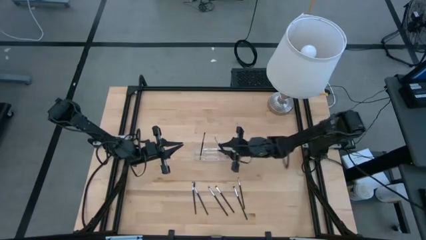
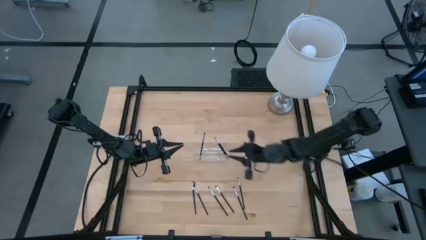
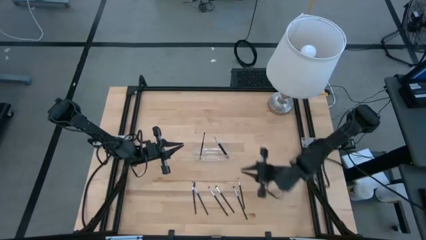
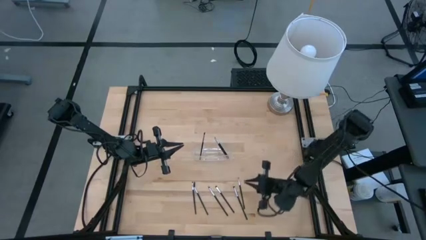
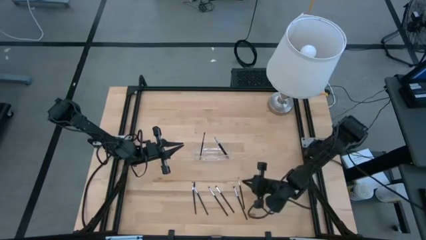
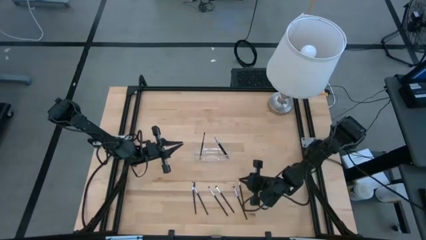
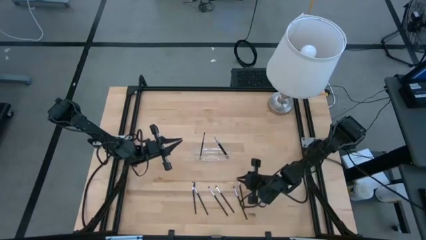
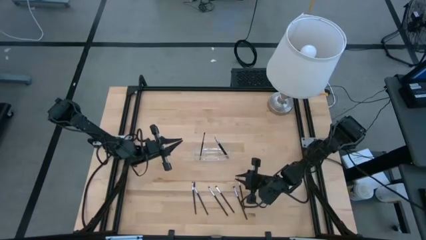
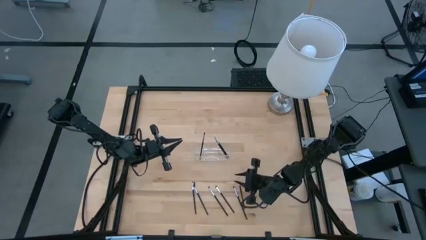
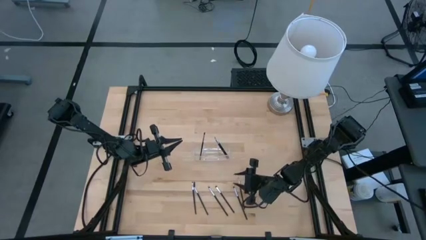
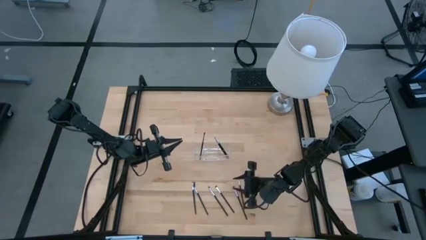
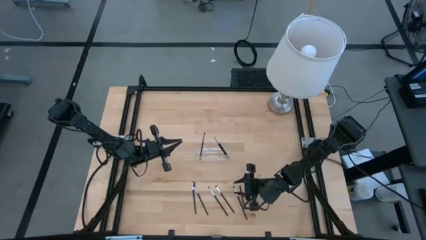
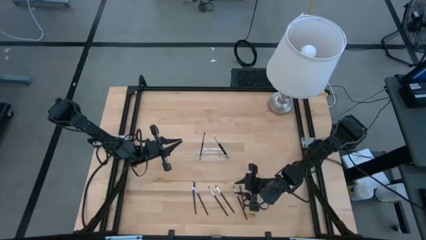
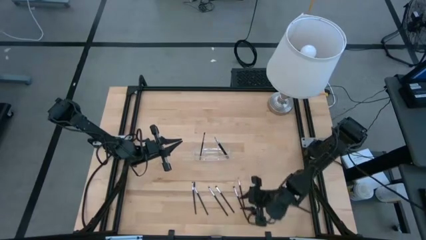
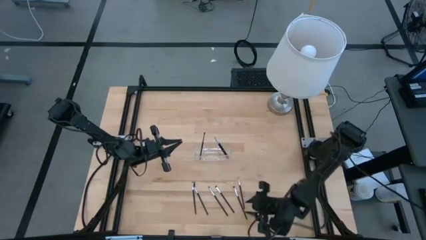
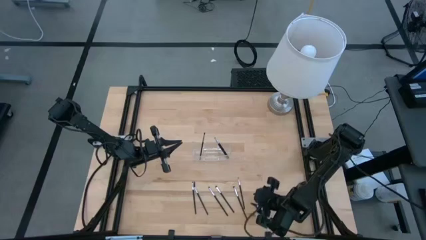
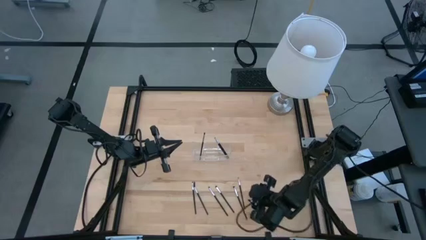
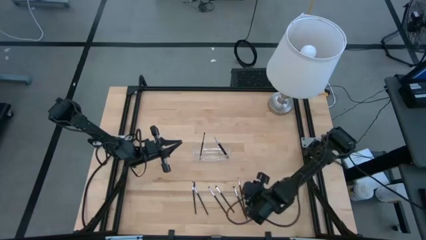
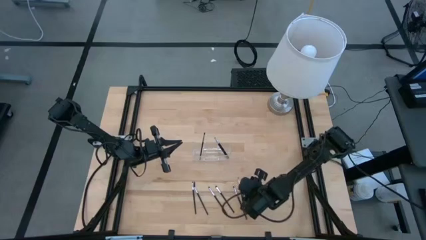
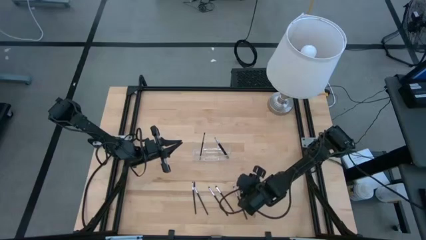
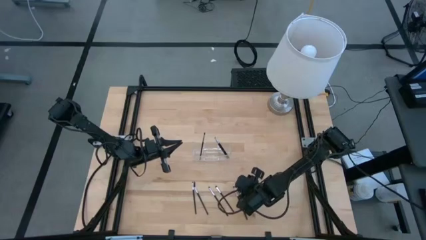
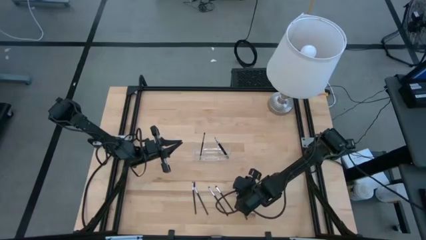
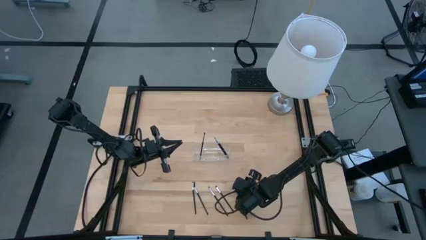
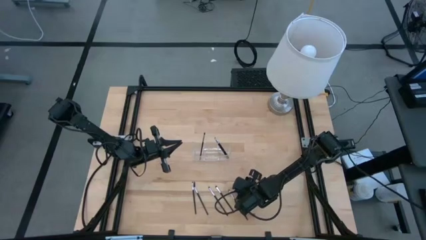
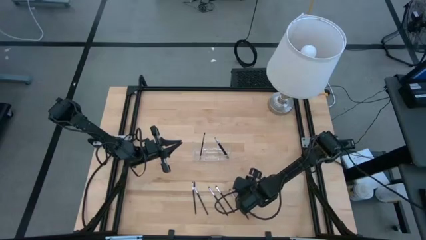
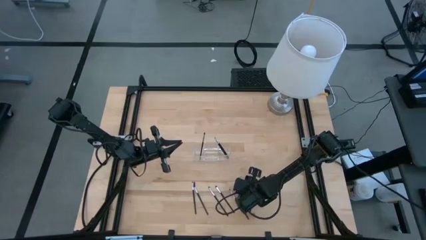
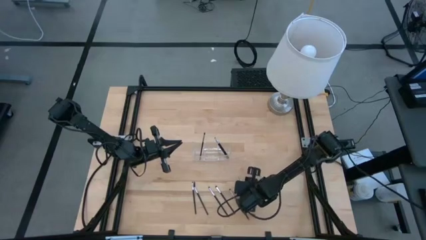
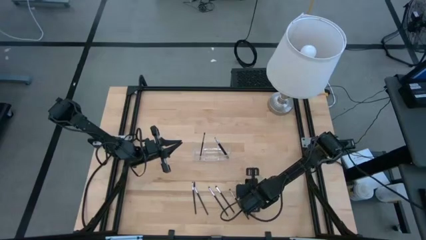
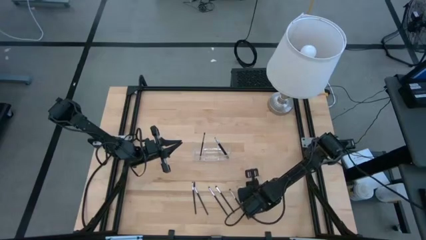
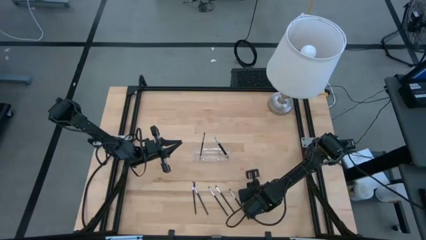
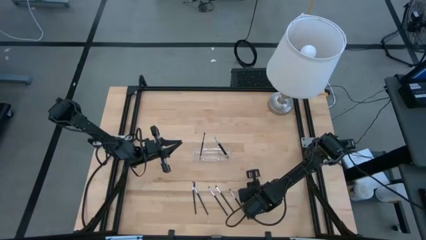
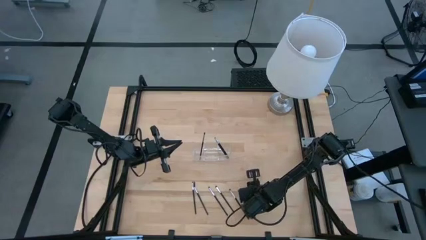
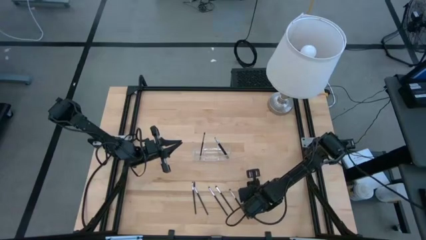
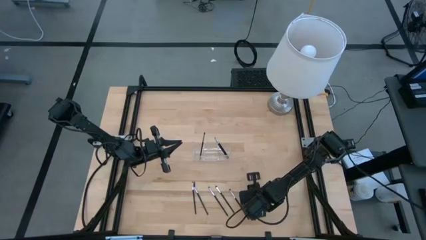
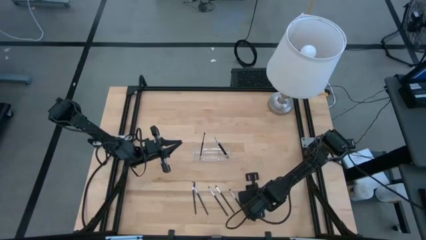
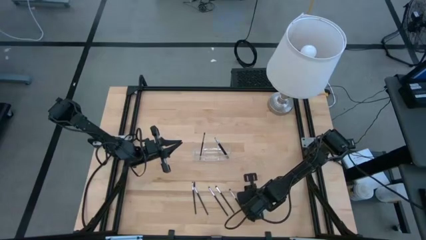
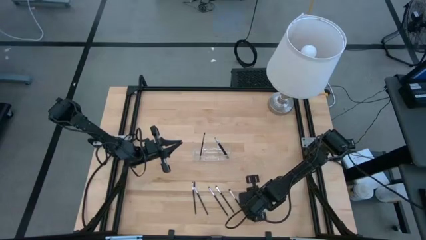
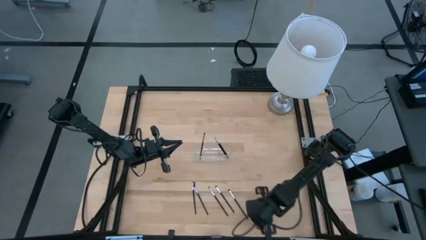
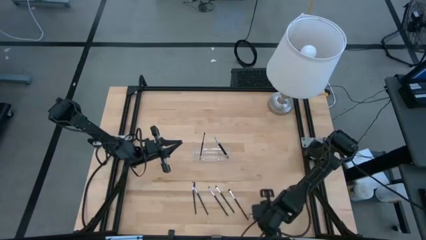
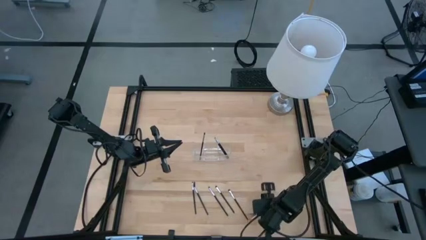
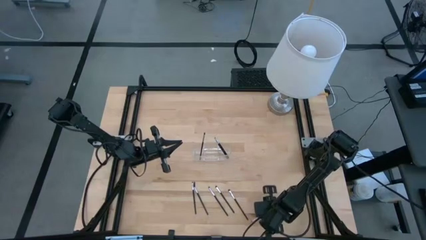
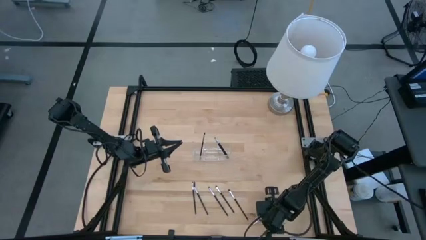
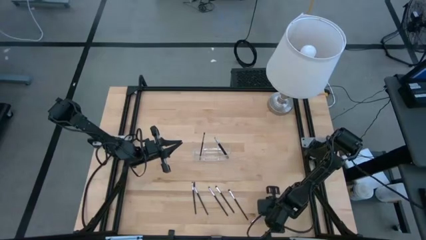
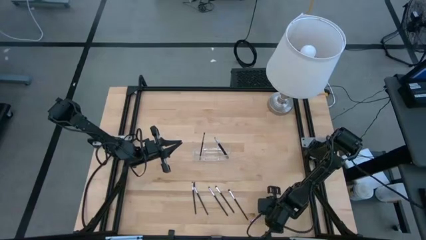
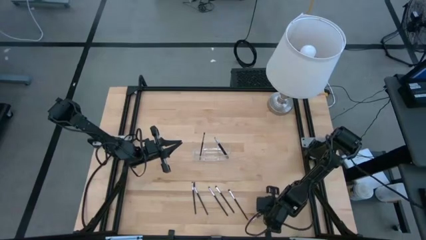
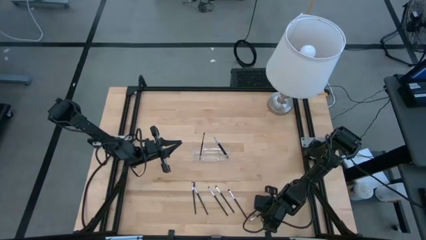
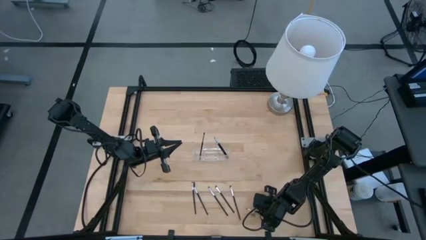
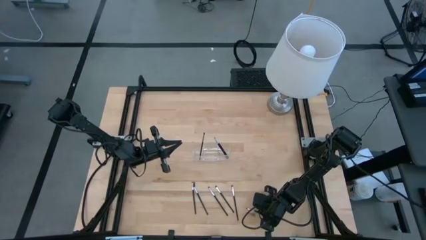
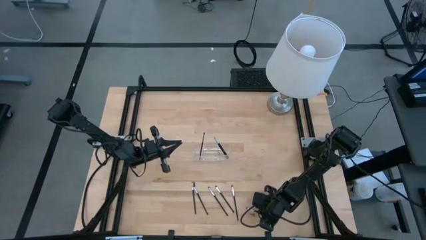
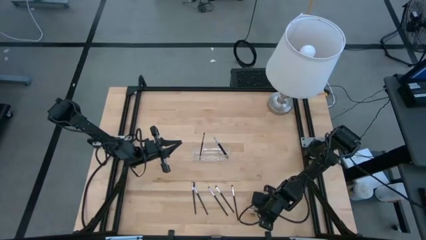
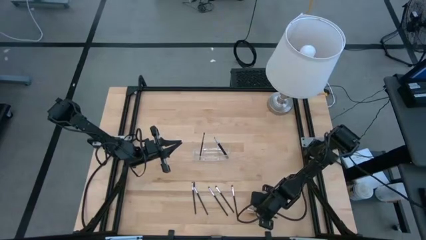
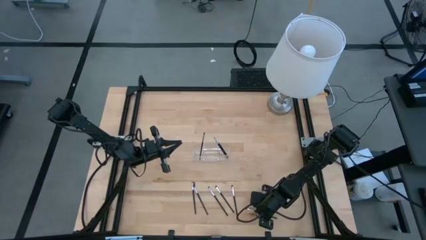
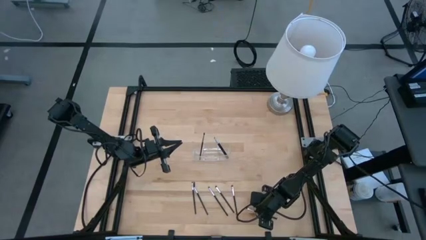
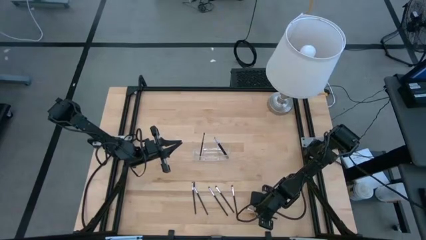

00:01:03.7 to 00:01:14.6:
Task: Put items in baskets/containers
Put the eyeshadow brush in the transparent organizer

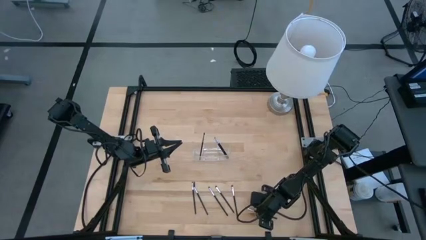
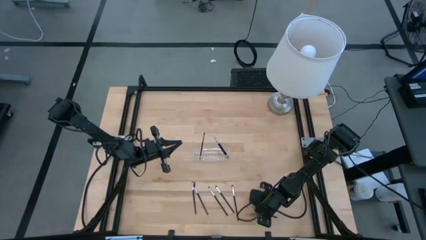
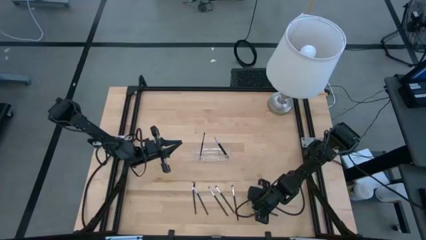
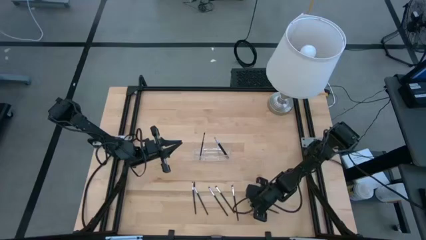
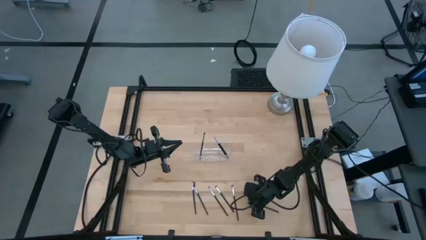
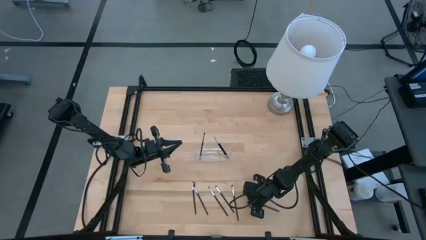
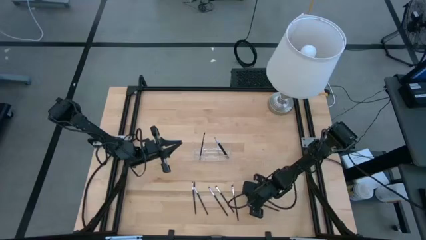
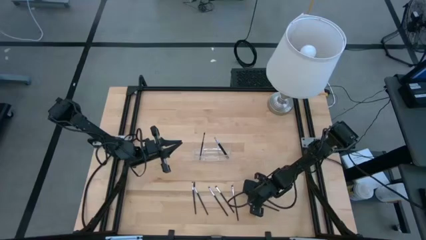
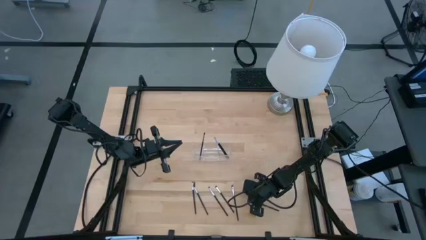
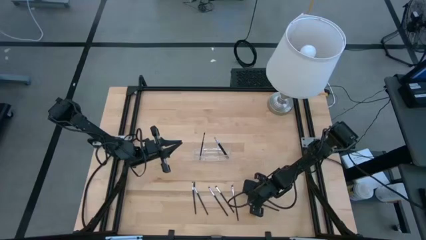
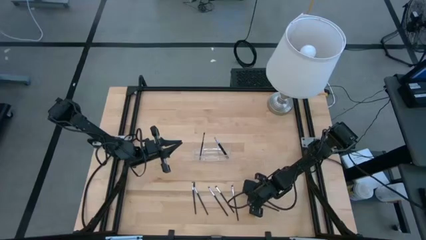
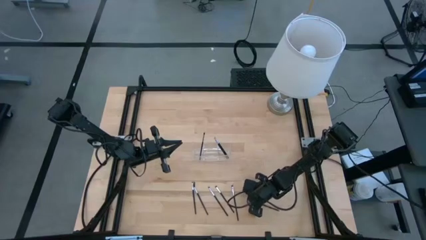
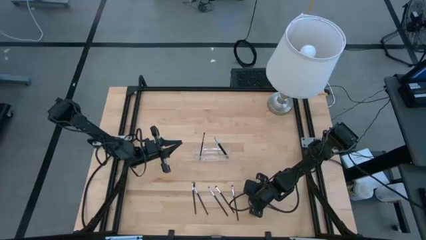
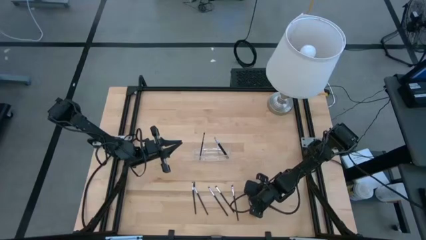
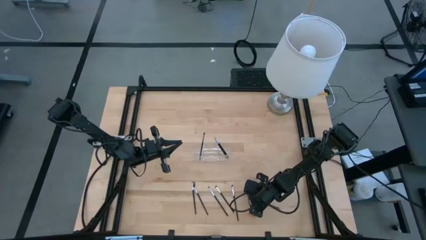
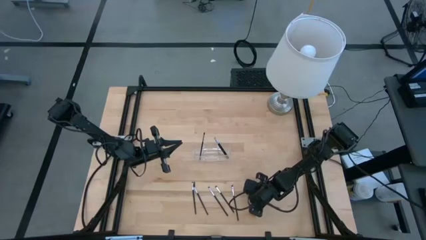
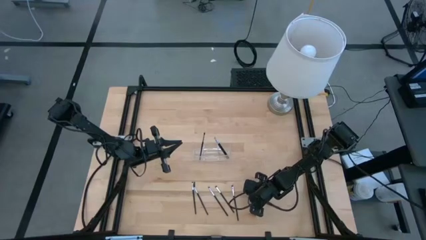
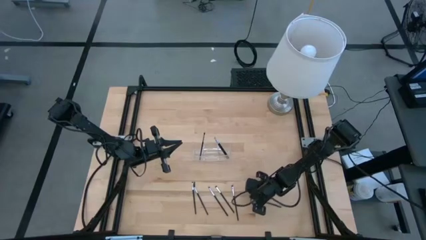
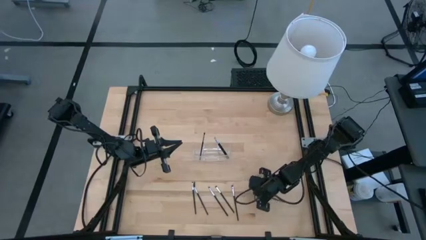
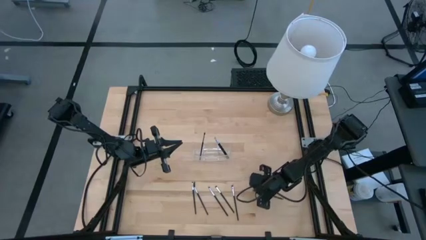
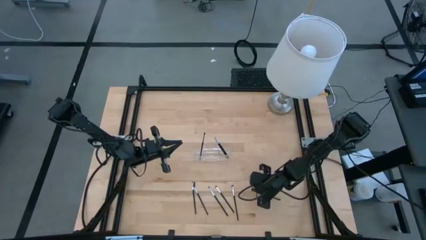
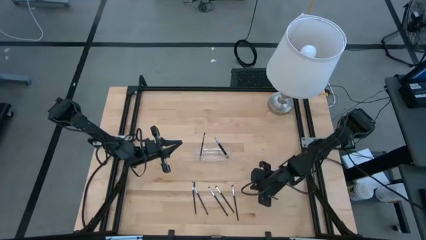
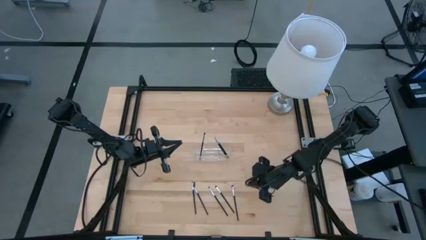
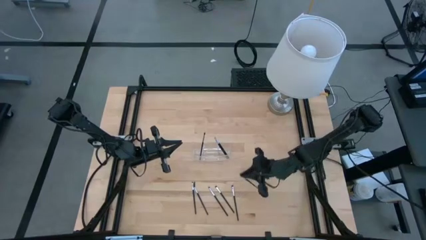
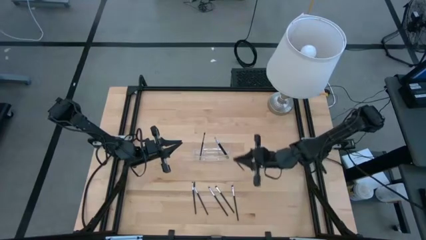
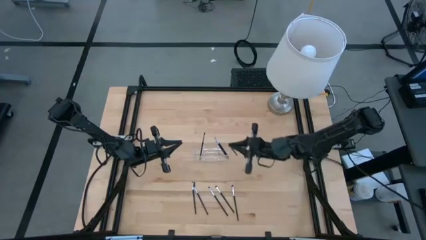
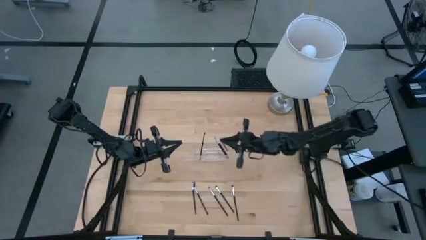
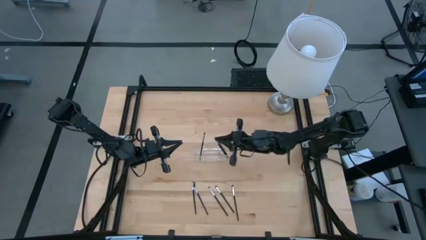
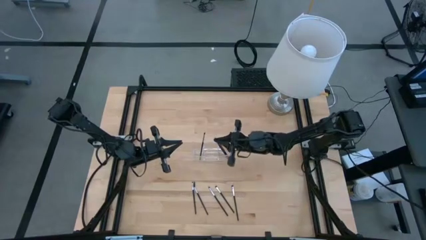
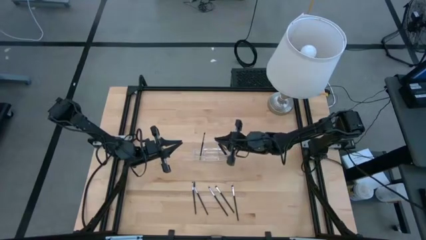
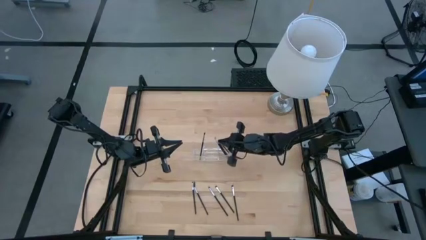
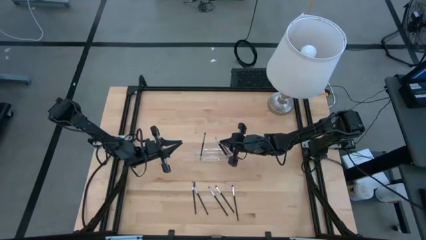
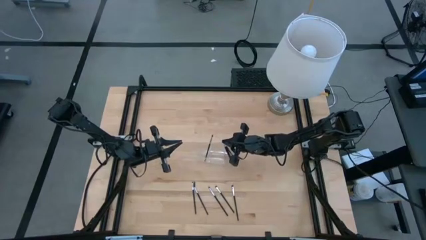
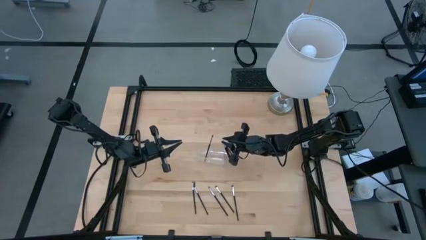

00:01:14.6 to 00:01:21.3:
Put the eyeshadow brush in the transparent organizer
